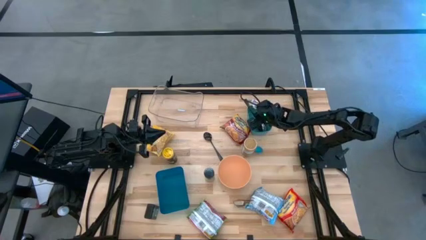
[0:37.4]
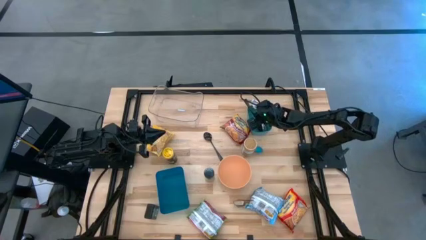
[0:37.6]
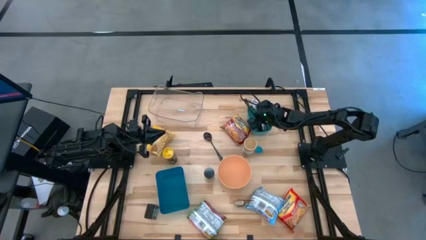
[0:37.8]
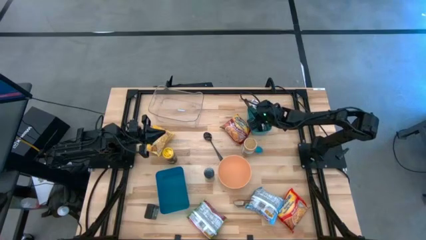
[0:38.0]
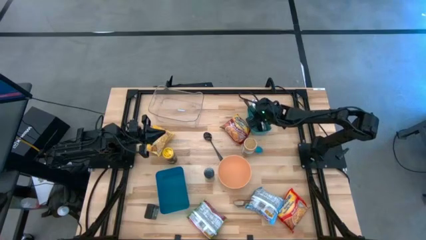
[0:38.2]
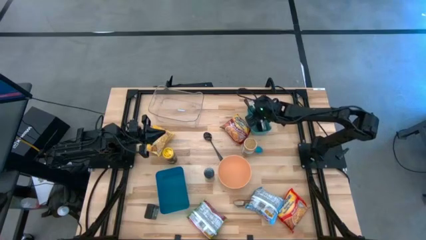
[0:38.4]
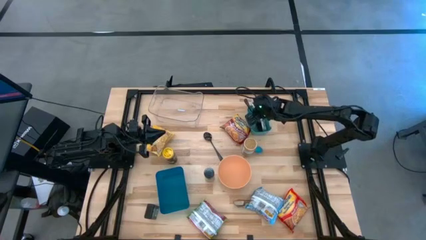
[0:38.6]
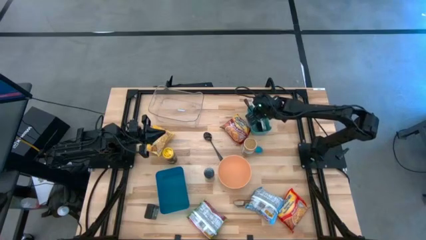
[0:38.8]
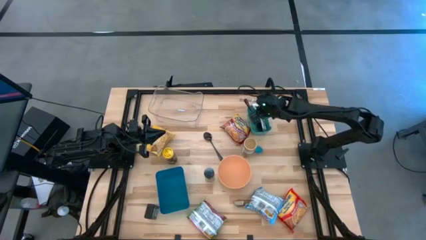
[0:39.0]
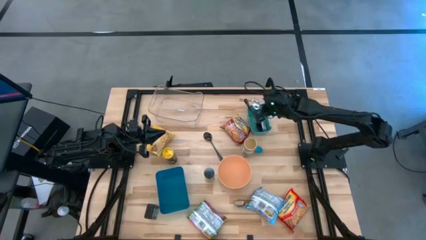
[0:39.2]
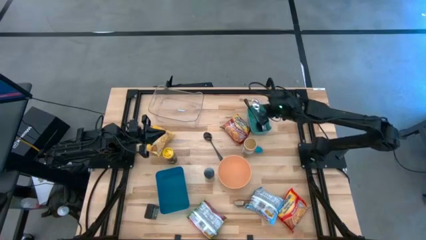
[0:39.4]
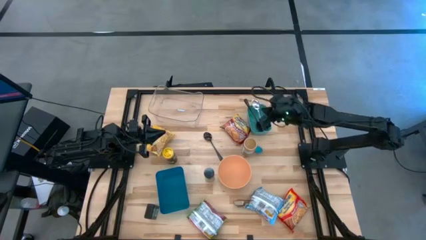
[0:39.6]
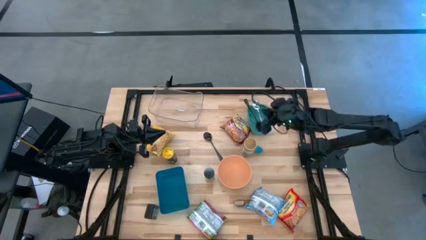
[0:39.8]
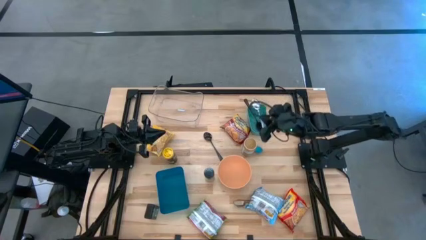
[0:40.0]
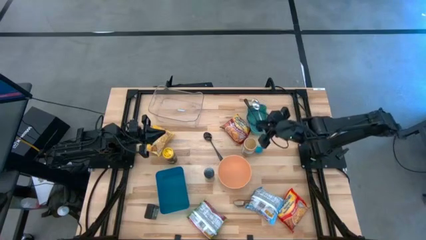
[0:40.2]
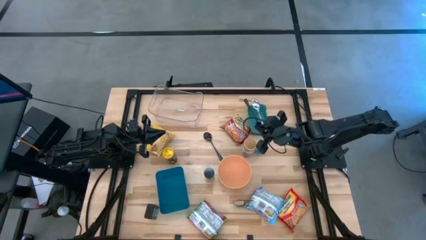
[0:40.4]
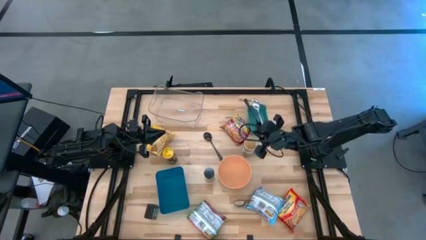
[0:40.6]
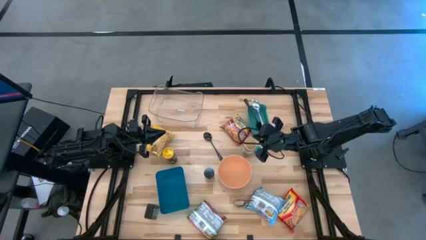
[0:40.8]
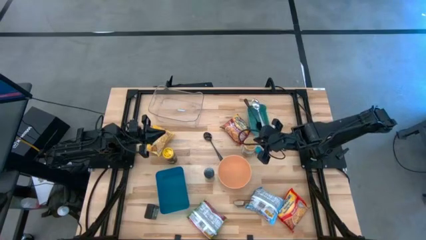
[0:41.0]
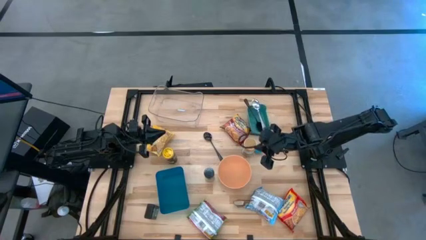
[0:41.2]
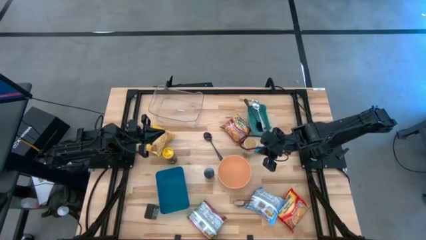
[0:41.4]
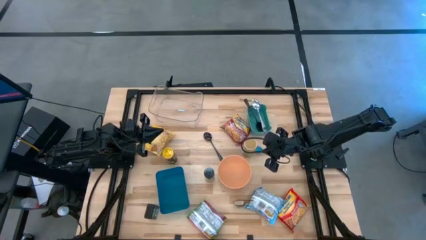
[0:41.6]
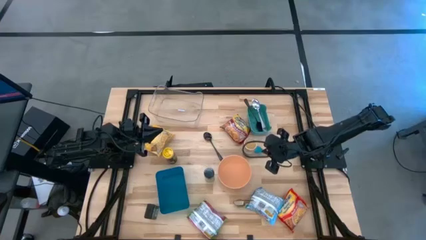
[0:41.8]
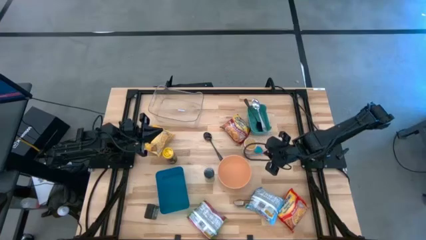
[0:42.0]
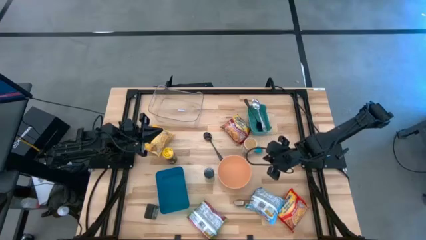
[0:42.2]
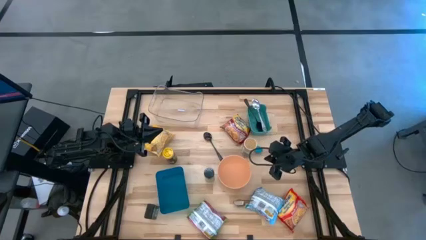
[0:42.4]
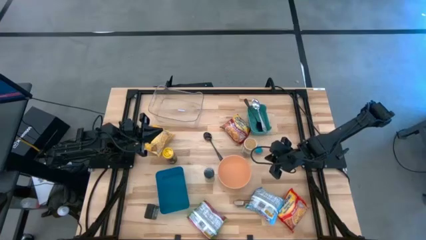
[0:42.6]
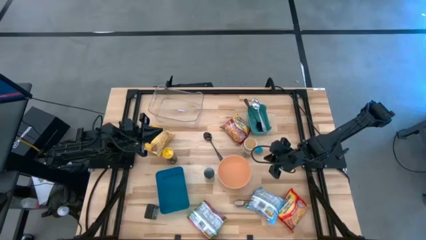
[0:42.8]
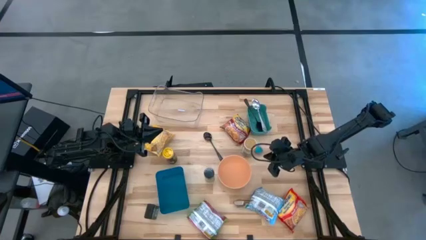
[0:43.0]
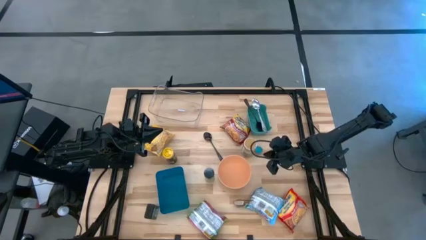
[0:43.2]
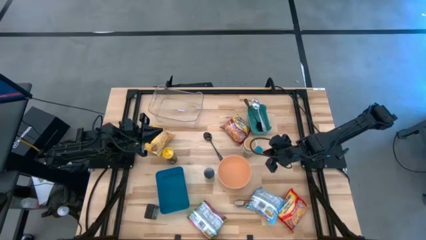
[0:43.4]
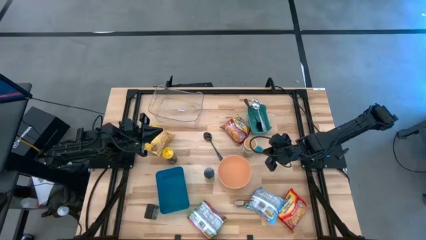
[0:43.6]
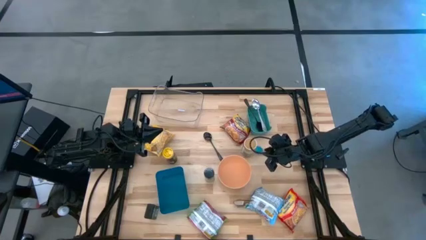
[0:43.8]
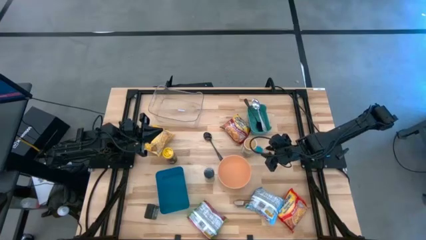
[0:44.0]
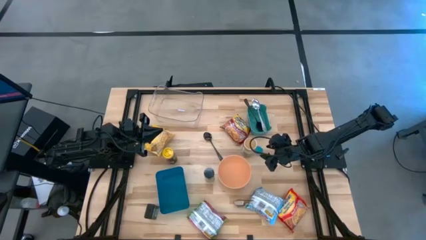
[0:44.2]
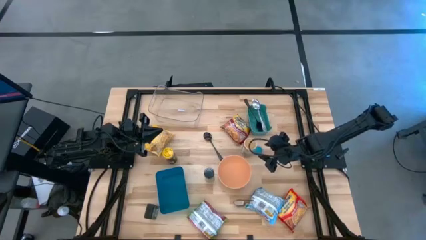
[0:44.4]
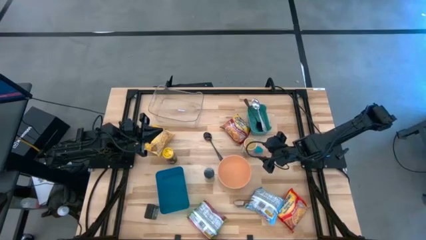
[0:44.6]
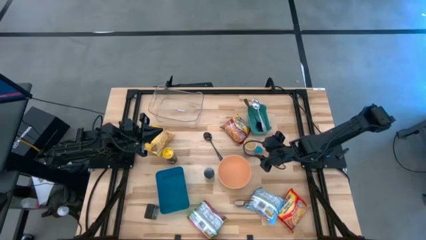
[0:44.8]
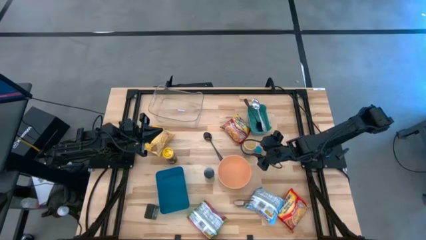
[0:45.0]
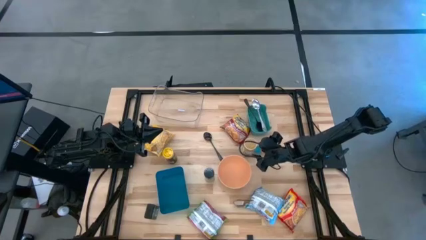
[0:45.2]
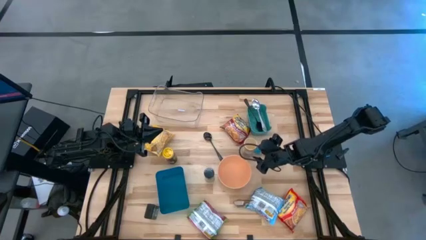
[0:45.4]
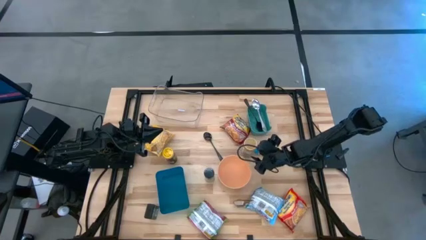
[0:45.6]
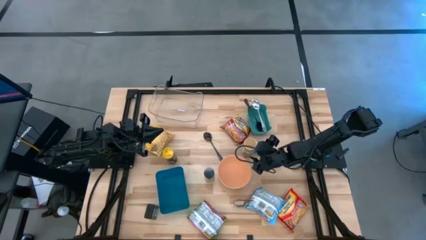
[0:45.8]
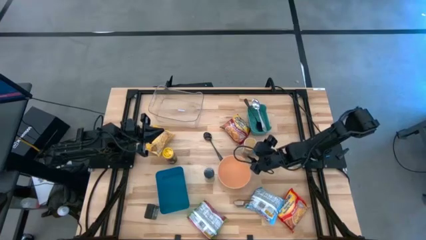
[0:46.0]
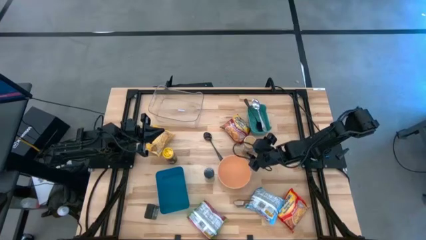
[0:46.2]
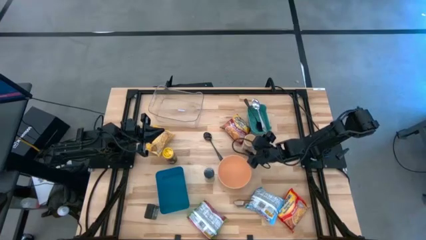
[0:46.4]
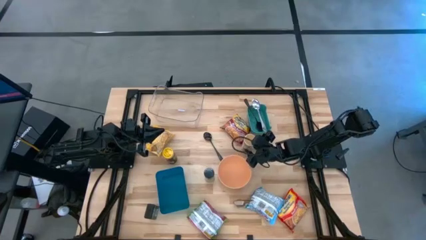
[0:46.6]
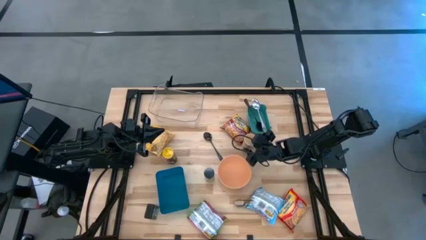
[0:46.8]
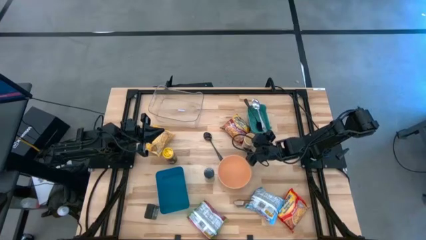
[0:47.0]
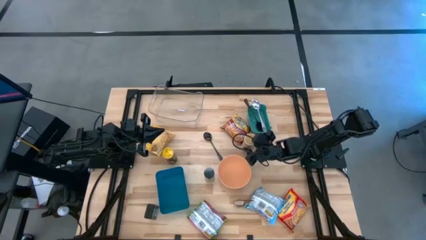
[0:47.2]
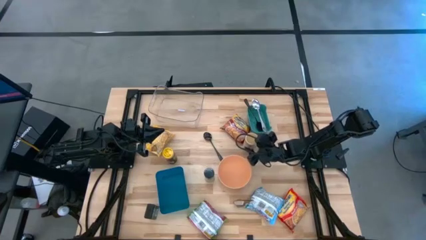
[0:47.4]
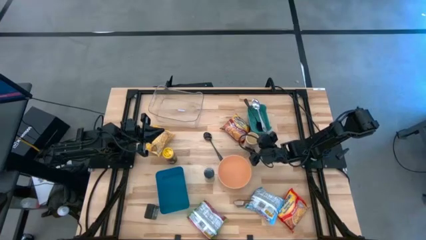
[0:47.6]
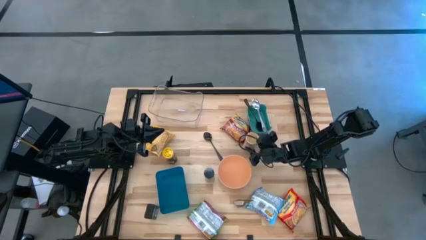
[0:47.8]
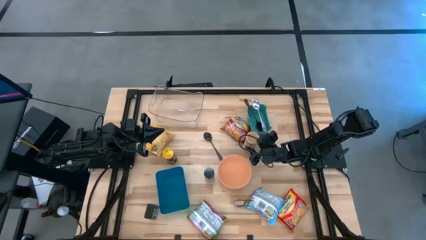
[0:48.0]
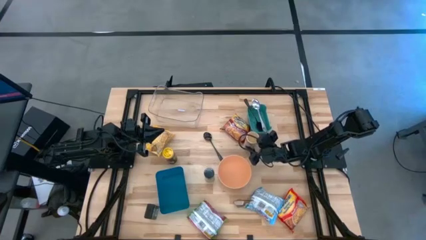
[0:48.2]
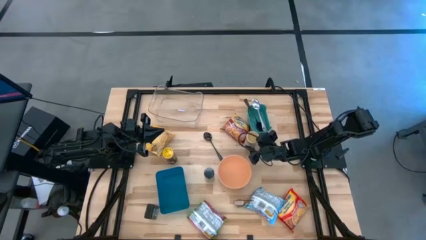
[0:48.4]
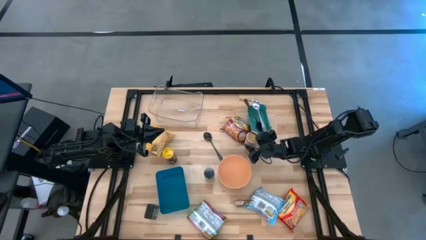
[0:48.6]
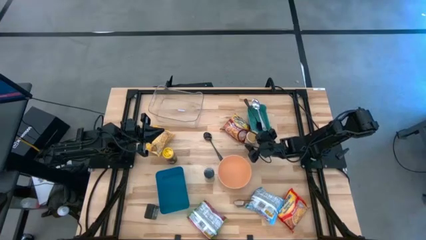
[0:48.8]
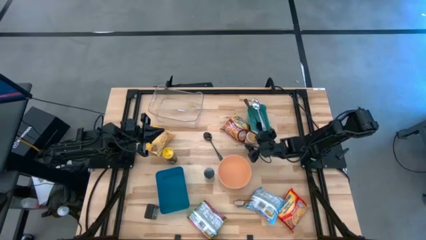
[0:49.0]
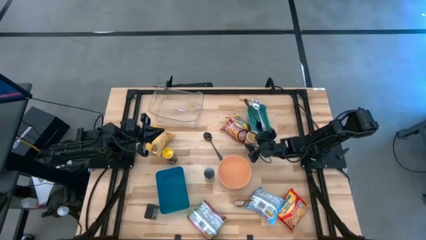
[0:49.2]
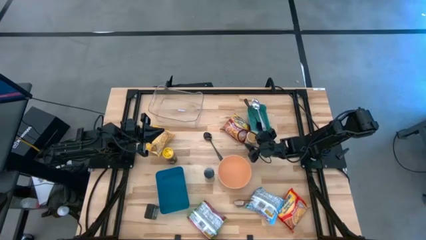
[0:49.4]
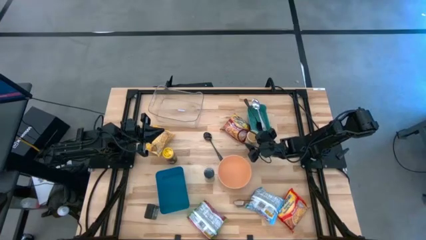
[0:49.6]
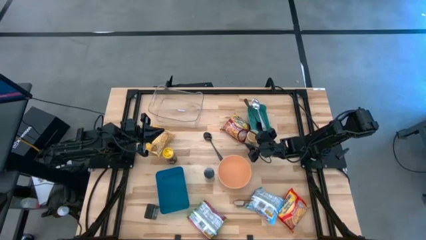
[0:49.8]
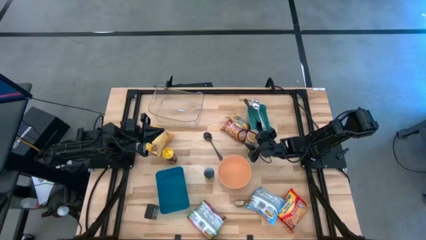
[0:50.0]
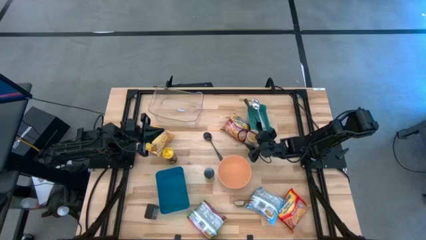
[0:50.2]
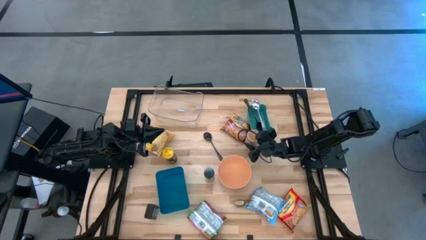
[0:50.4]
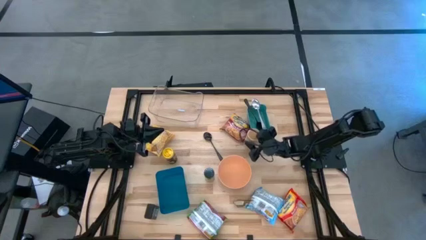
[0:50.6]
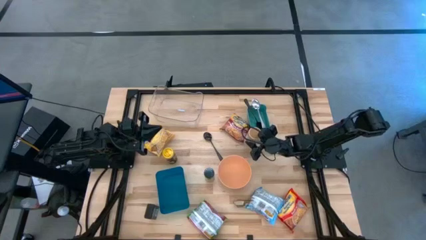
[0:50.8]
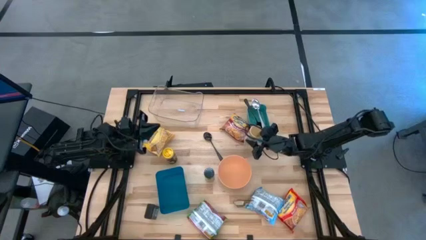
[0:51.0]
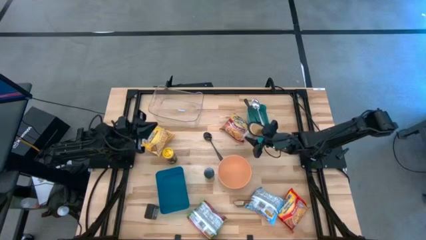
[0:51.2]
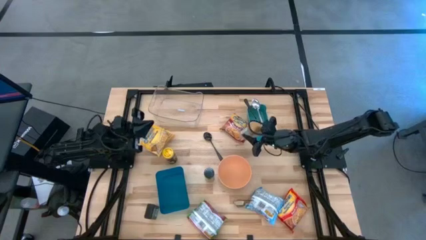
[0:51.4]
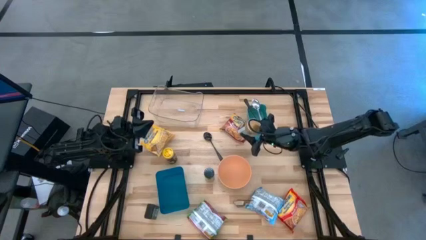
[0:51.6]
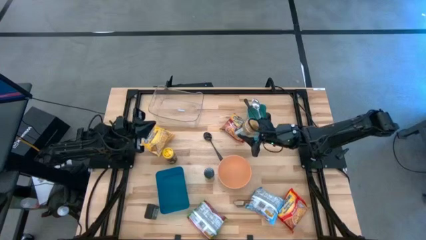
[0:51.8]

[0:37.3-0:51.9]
Task: Pick & Place Food Item
Put the gold seasoning bottle into the blue bin
